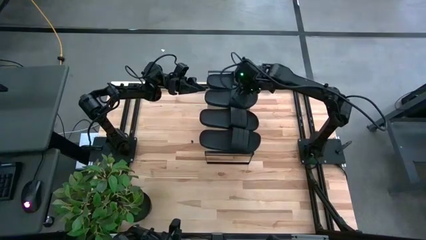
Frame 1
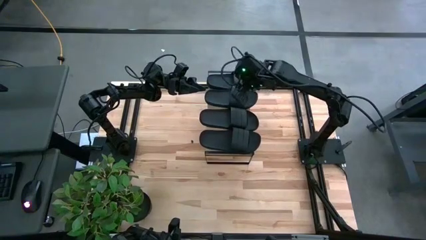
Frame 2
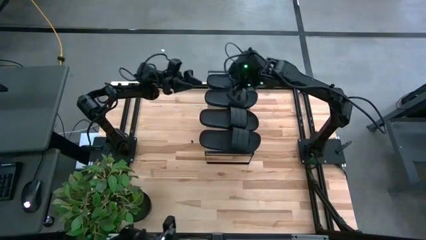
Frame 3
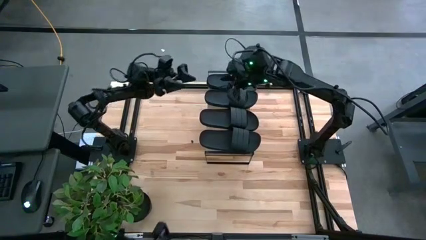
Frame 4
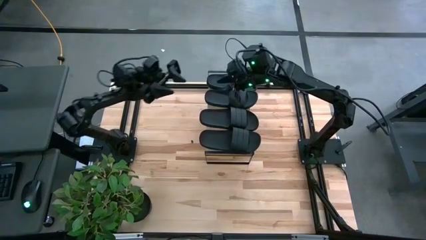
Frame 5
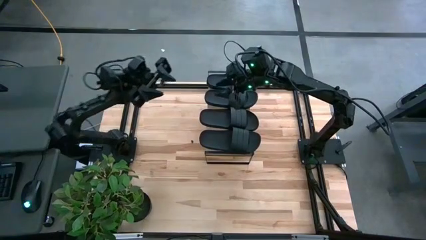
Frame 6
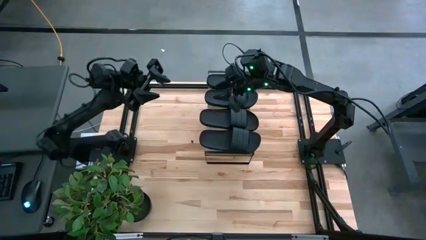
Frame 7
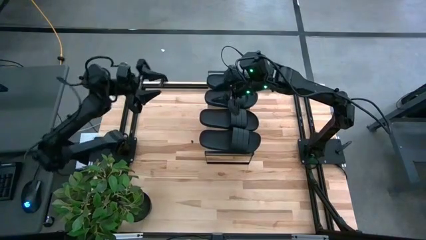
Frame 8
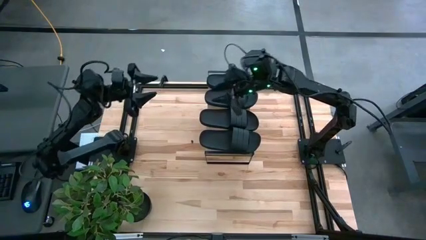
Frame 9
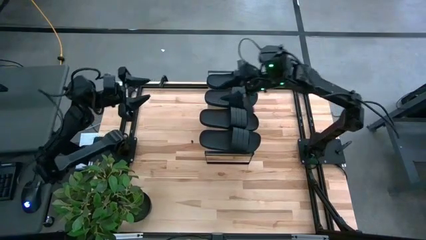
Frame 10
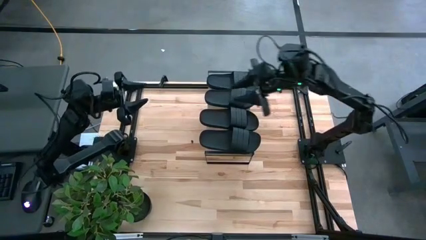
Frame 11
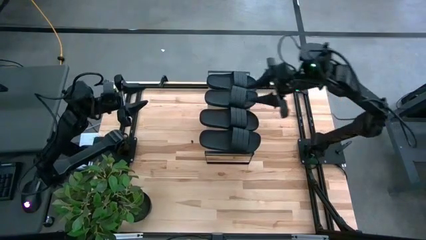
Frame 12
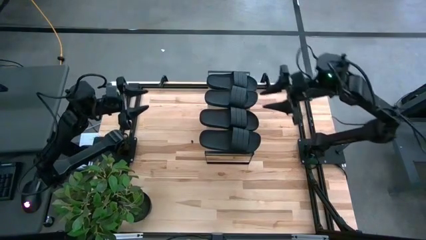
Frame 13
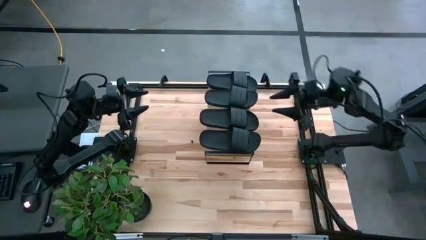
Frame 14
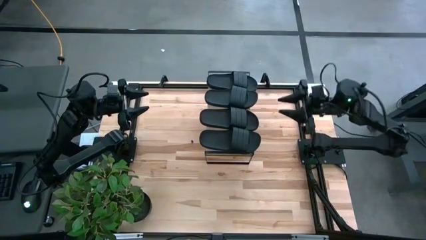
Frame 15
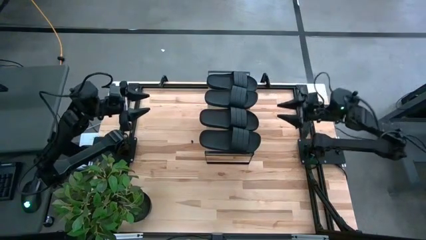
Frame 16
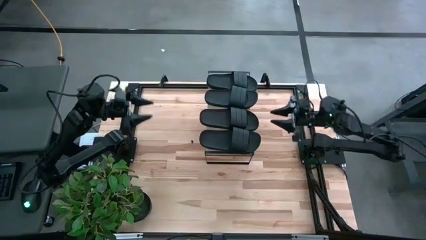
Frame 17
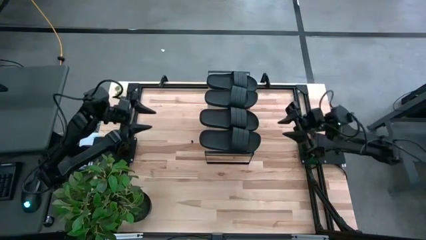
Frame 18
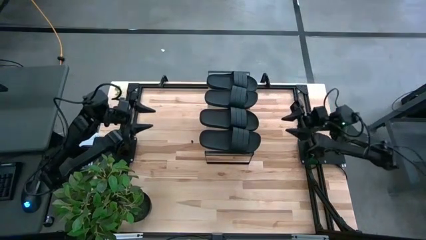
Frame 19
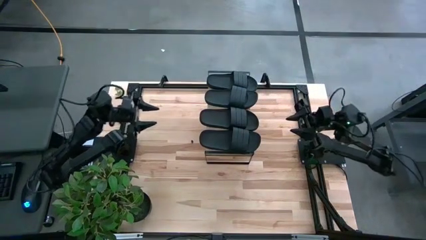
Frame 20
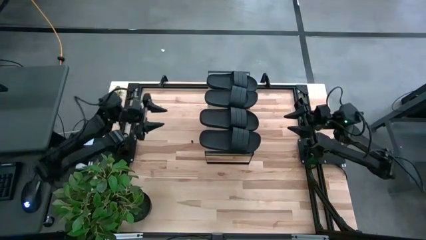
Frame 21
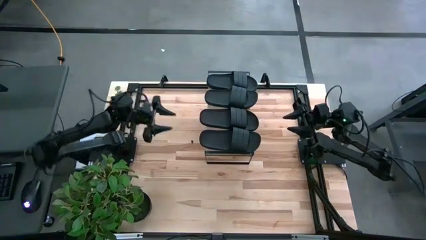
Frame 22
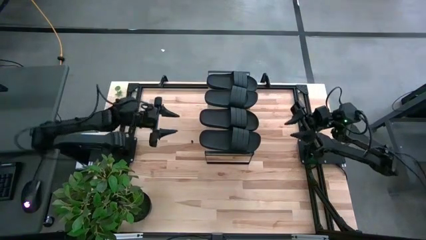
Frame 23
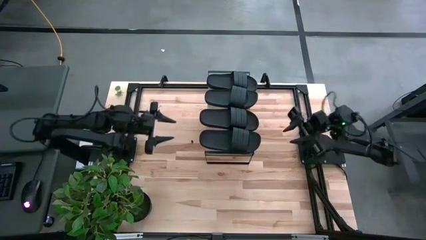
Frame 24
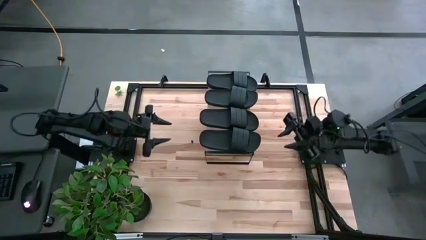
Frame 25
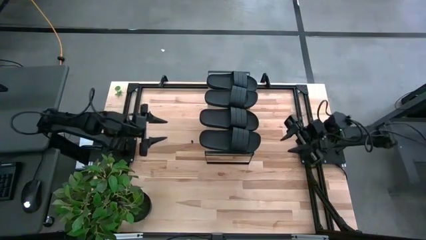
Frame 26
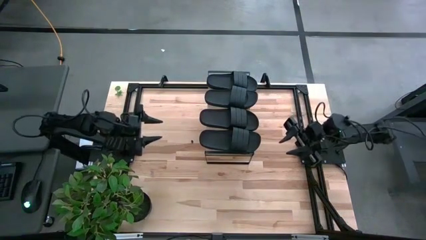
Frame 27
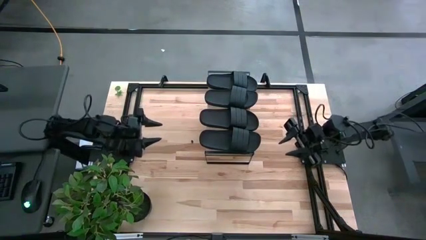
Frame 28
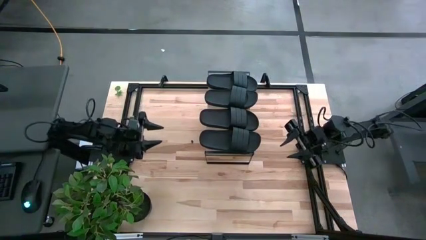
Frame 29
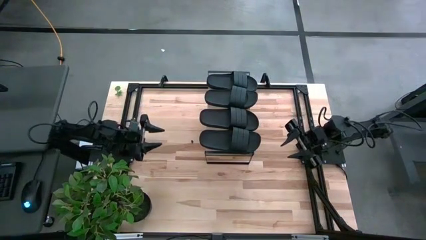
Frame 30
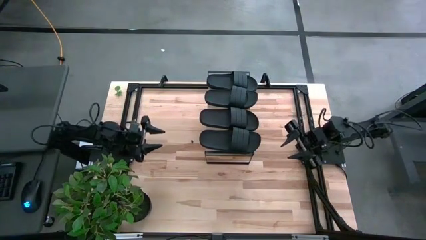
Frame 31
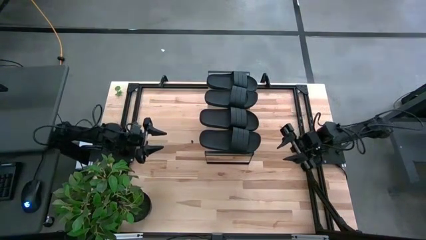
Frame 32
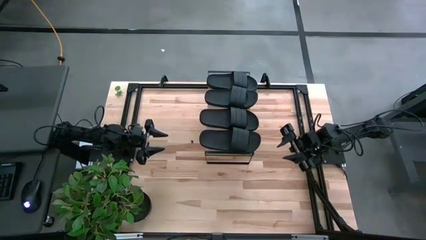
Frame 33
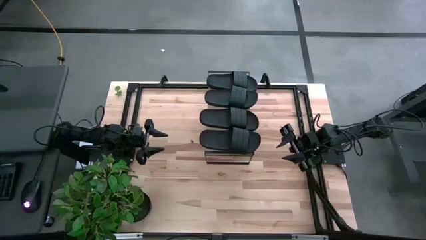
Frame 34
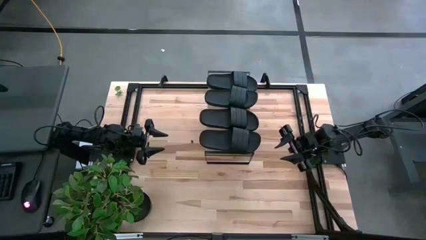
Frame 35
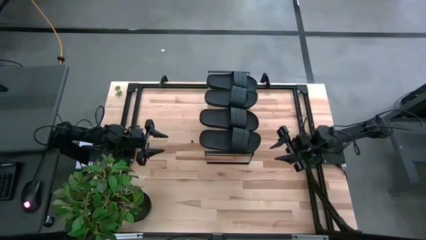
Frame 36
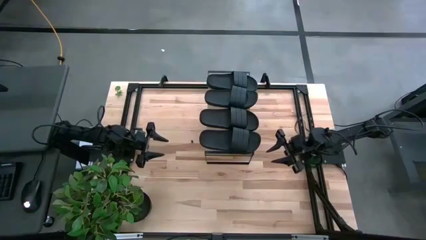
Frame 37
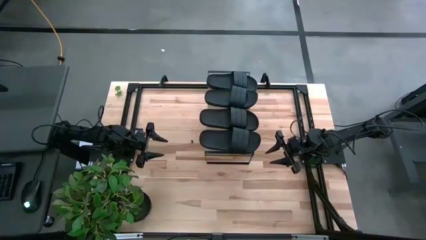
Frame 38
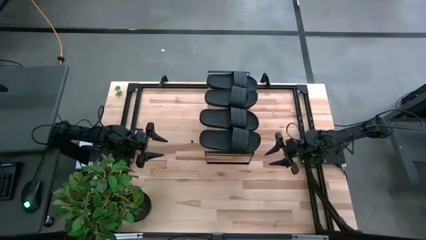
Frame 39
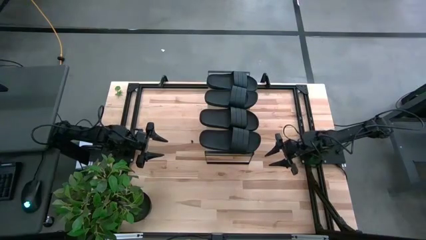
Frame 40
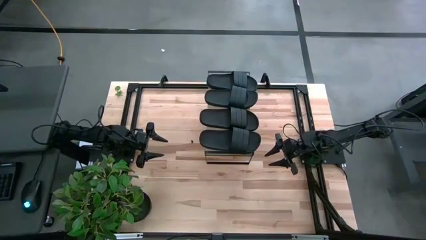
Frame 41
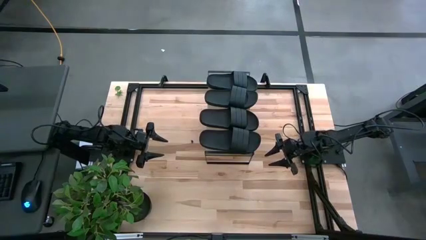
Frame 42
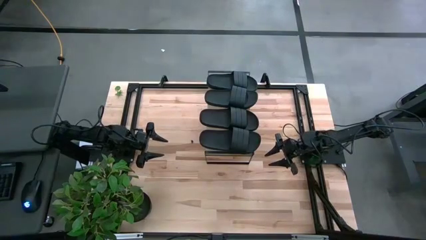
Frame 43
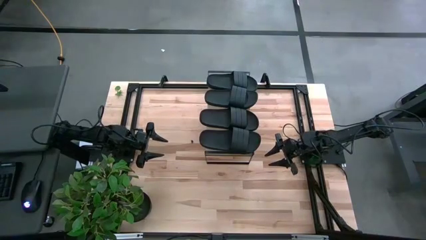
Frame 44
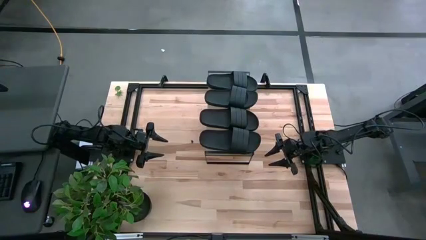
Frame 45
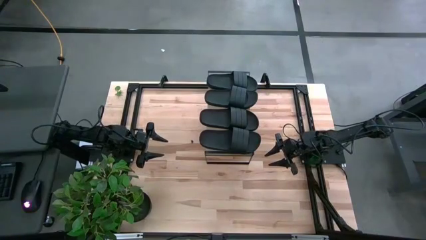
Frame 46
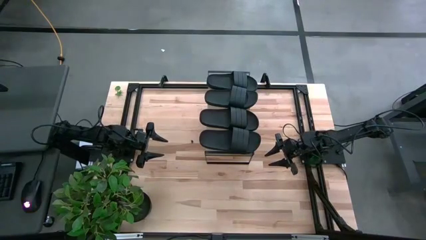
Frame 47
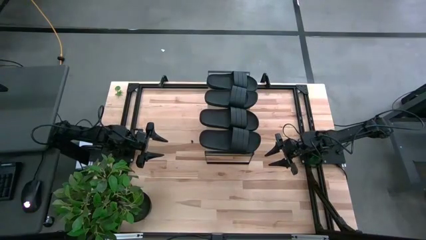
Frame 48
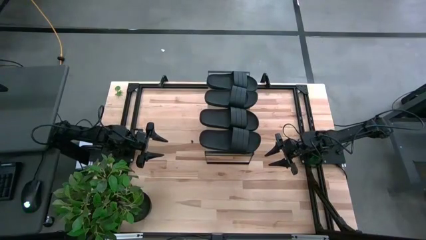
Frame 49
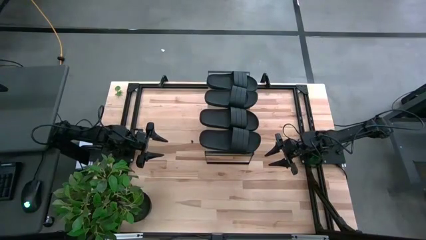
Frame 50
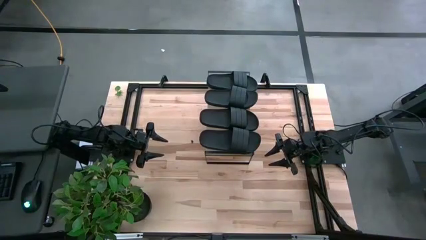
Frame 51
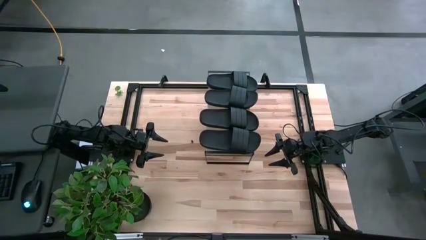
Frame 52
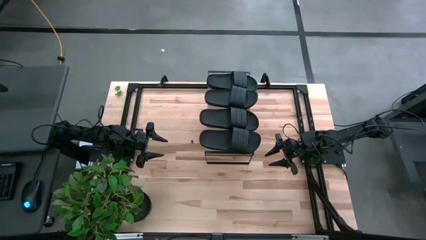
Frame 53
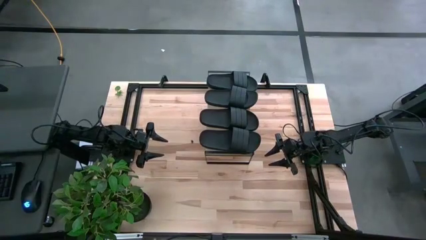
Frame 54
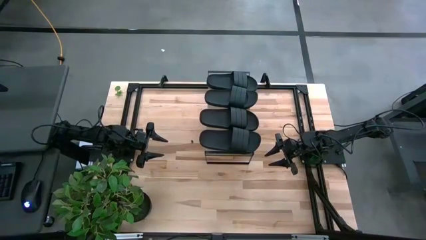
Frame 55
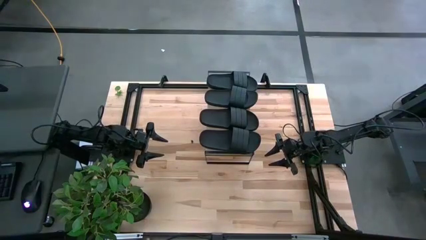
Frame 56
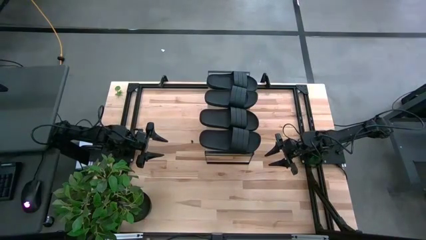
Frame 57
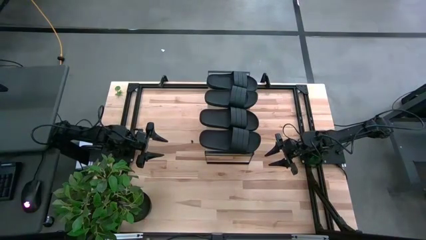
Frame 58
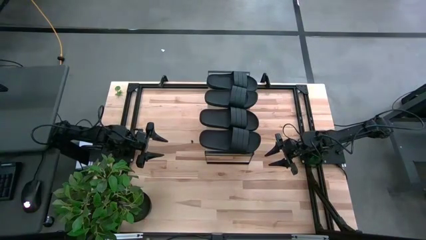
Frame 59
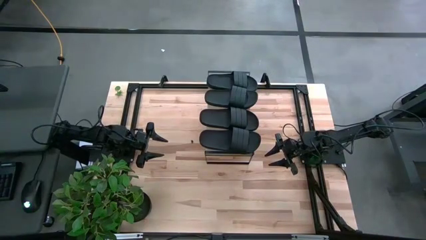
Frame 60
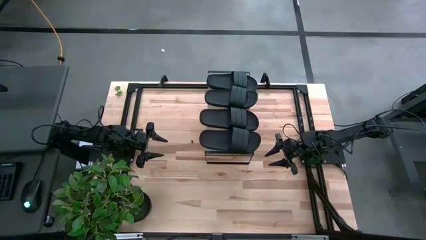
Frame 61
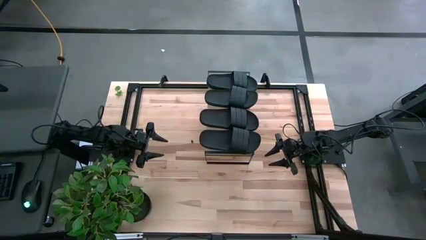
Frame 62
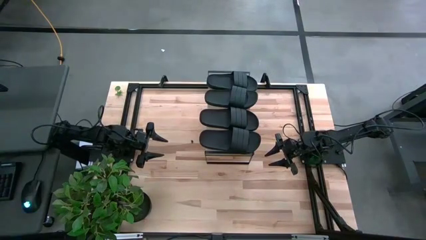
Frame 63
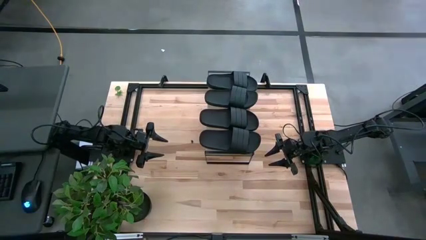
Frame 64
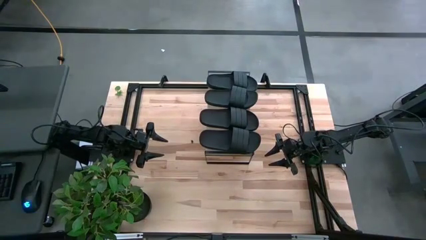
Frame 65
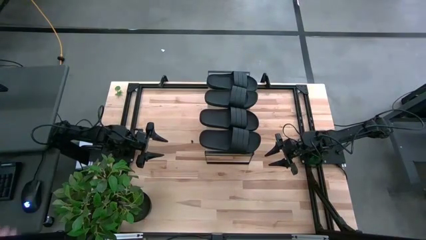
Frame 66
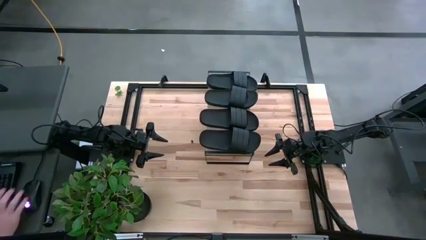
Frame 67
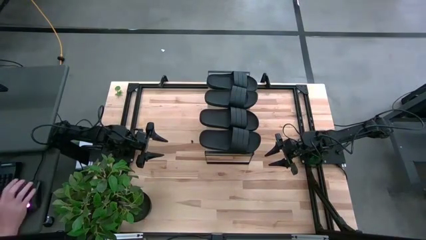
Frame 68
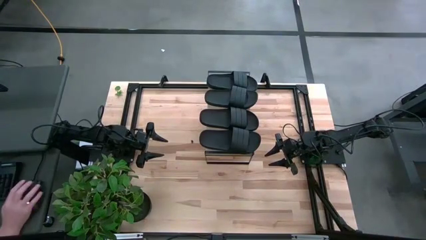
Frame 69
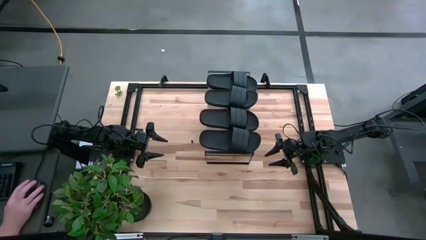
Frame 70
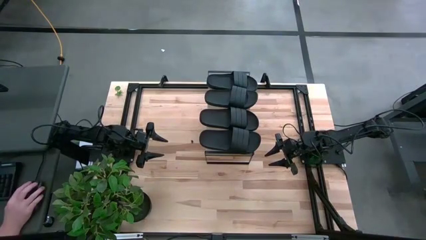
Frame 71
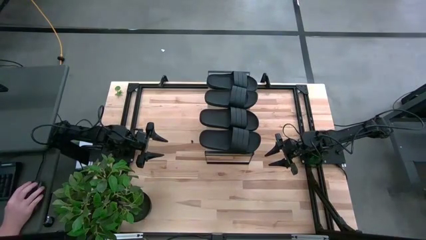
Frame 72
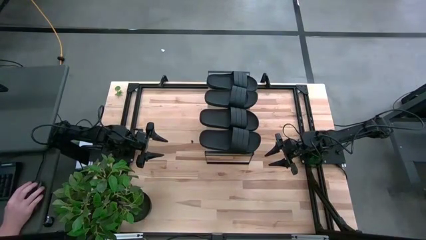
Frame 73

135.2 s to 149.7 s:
Task: Pick and place slides into the shelf
Return to Home Position
